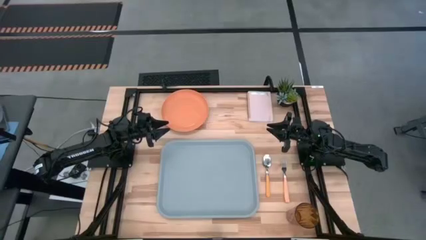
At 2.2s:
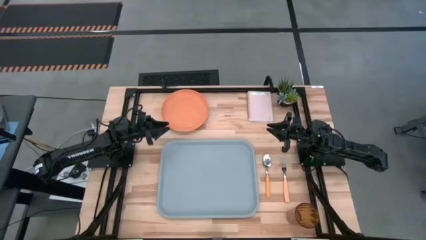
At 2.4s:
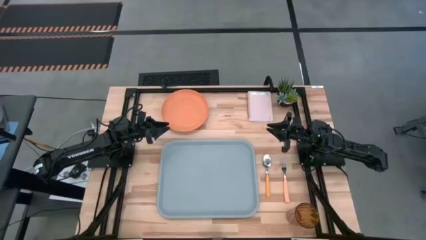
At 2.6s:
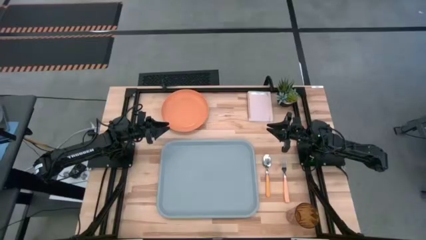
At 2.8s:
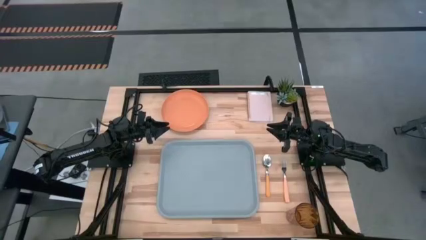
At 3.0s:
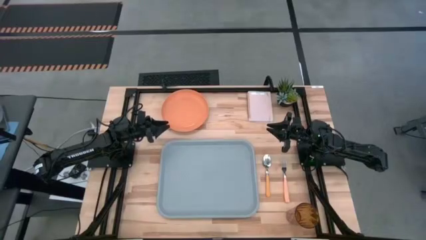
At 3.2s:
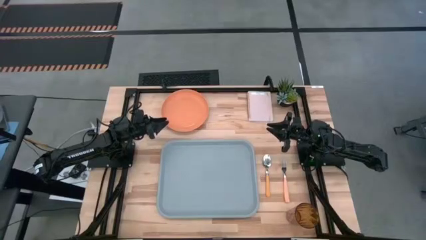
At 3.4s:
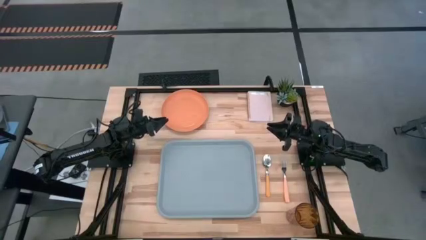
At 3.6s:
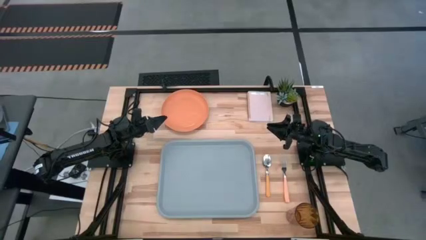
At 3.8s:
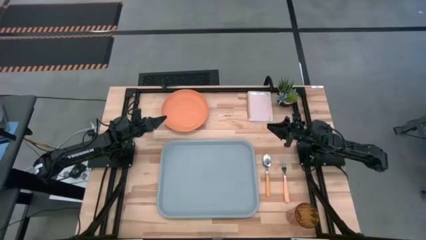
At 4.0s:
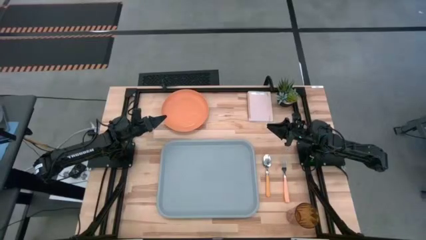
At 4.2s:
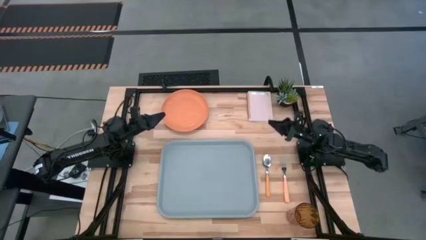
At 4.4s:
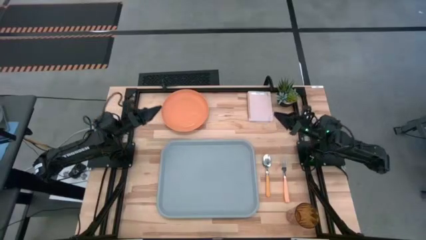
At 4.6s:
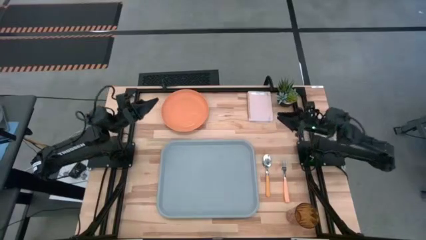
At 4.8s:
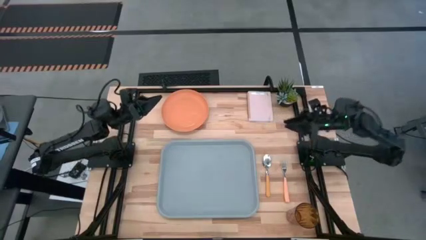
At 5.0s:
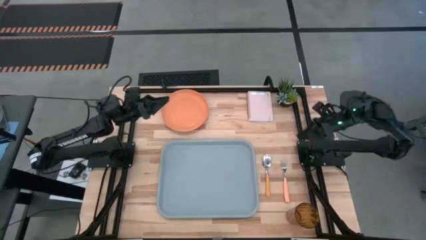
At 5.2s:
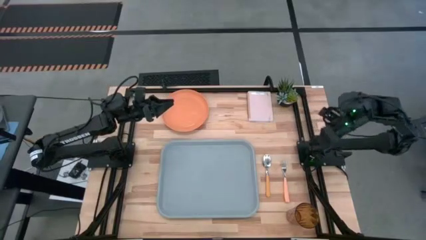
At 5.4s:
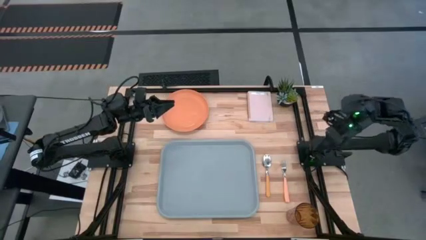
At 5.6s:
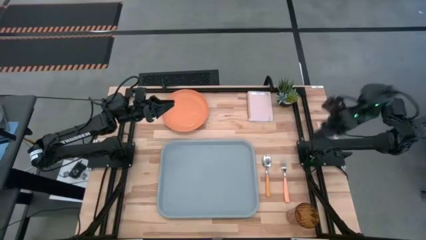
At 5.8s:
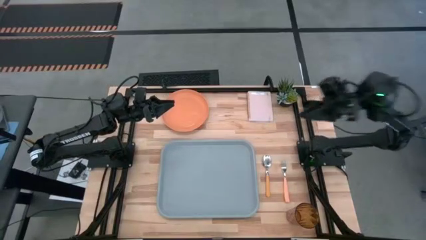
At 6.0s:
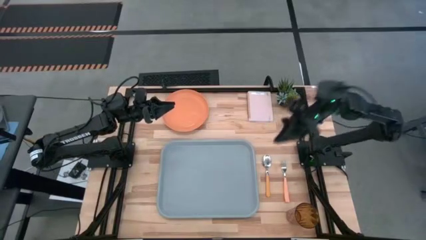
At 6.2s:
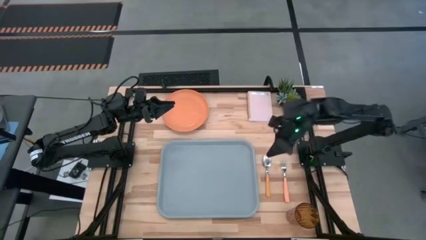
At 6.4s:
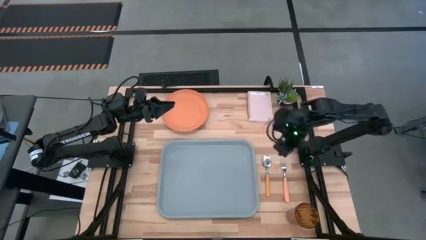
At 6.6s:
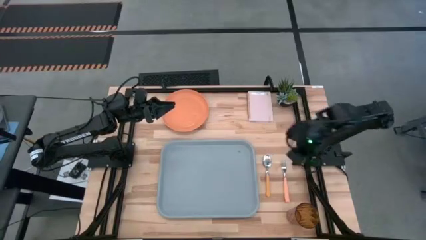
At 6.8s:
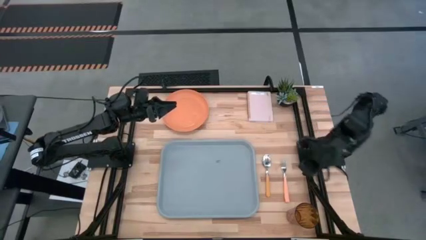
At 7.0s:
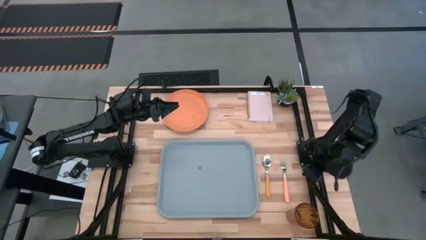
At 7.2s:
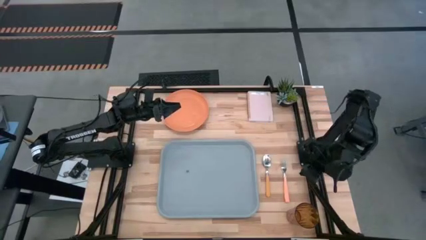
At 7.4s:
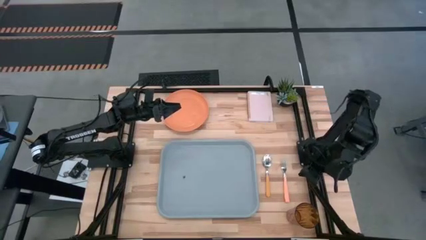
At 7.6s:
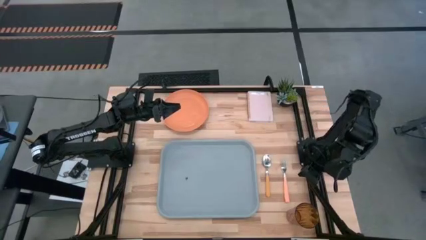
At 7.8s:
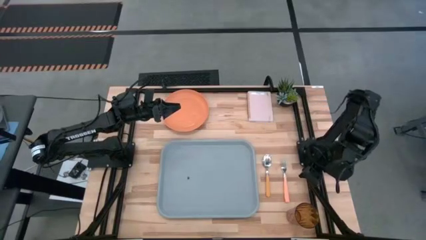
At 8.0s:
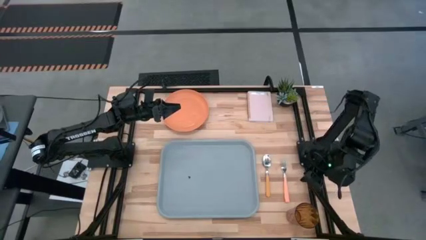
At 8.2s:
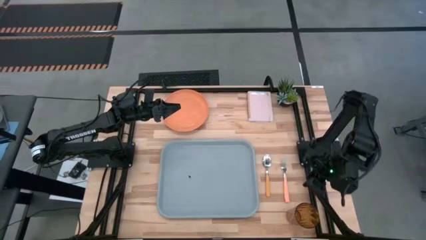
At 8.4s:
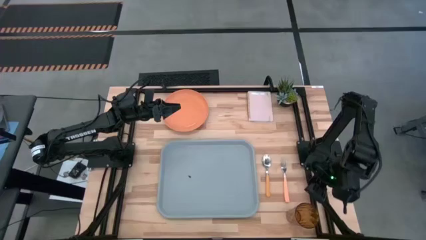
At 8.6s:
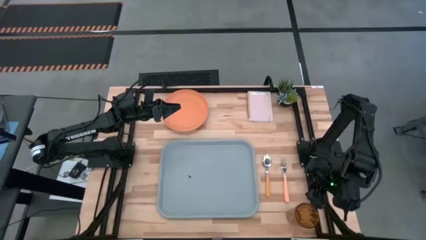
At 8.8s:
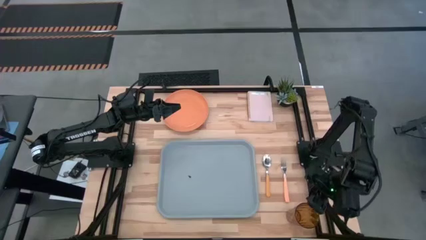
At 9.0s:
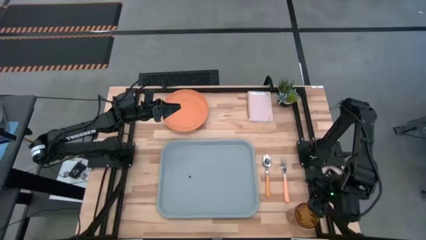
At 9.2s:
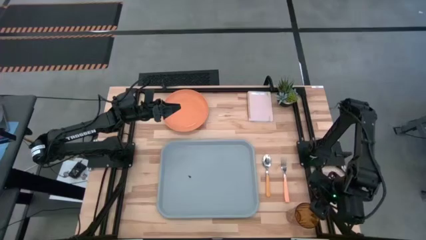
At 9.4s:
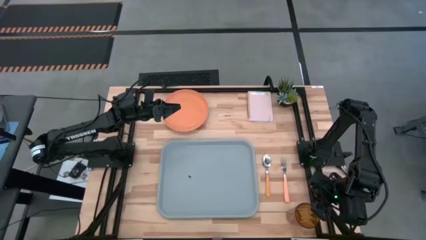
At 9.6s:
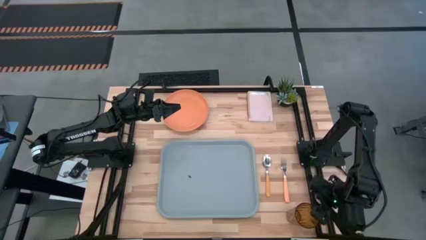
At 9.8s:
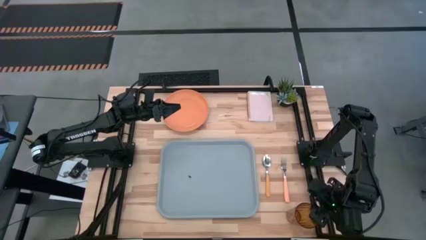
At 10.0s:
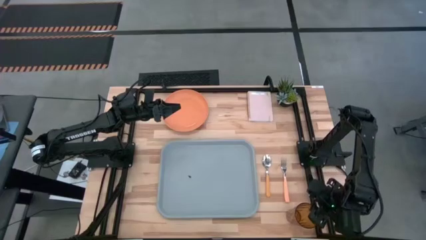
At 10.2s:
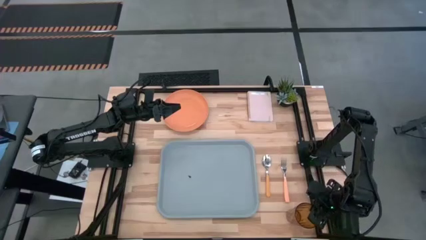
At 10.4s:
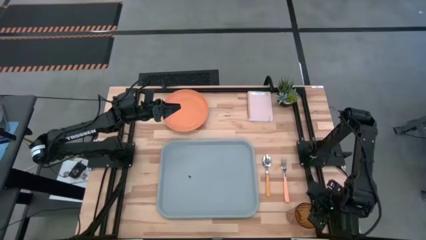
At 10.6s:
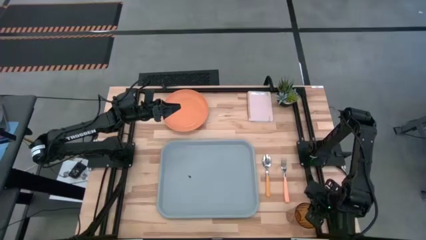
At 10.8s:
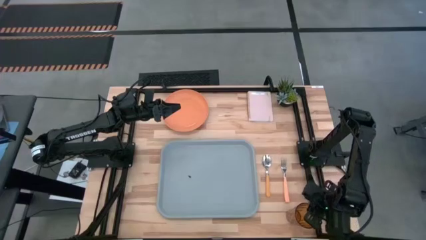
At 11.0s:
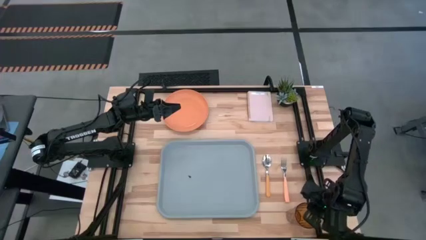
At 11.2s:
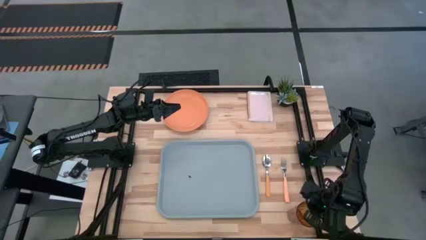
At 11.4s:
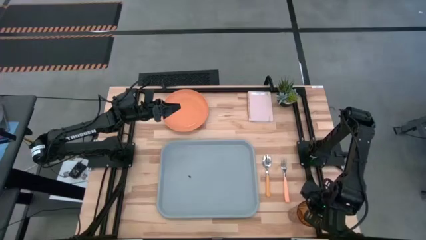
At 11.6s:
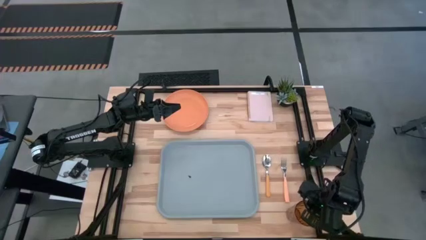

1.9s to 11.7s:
Task: Pick and place plate/cup/fork/spoon on tray
Put the yellow glass on the serving tray

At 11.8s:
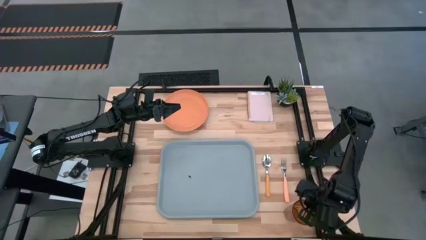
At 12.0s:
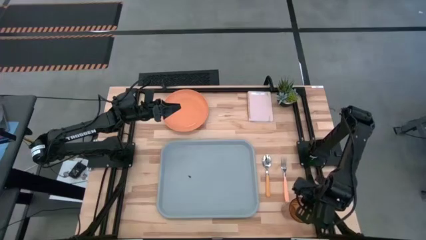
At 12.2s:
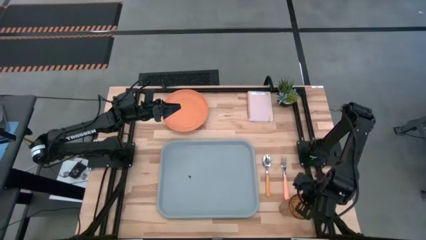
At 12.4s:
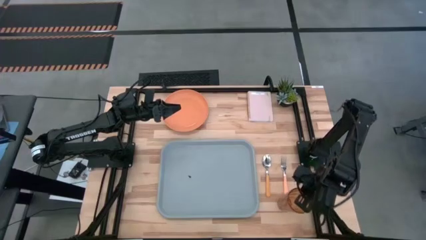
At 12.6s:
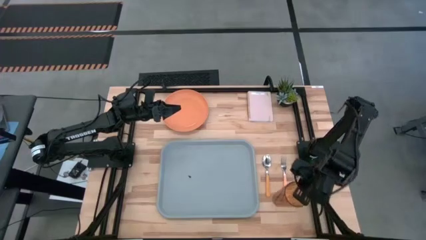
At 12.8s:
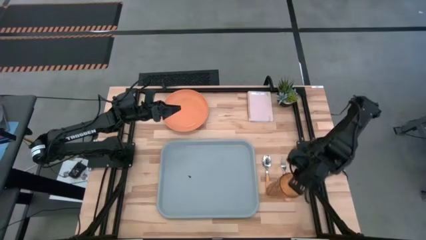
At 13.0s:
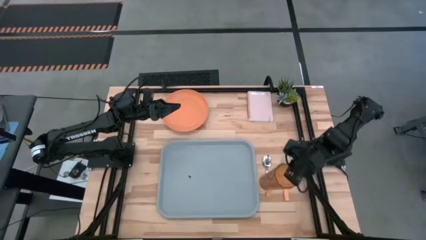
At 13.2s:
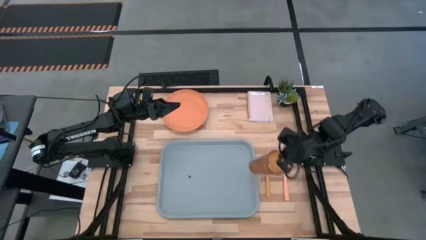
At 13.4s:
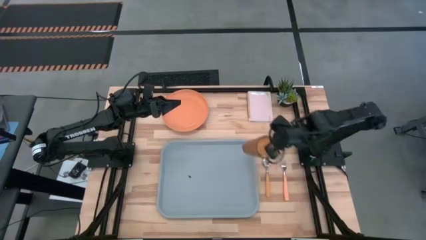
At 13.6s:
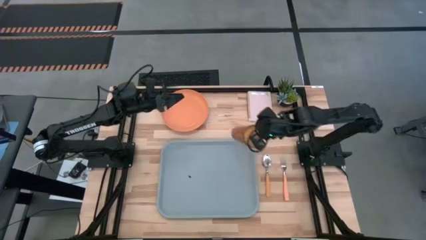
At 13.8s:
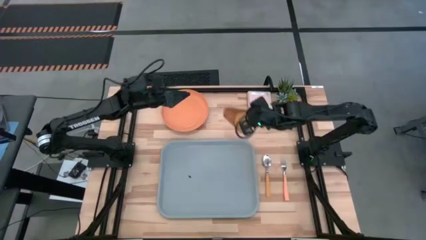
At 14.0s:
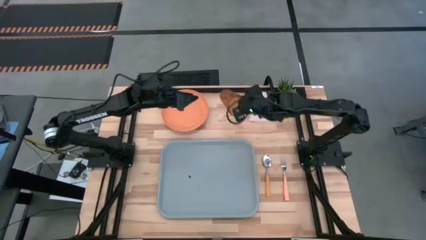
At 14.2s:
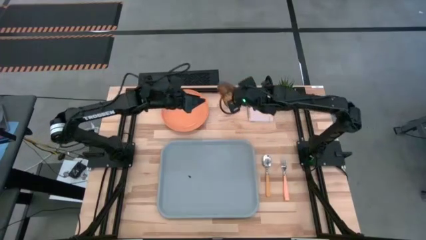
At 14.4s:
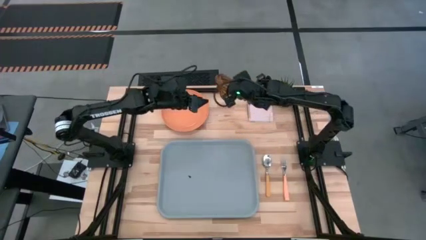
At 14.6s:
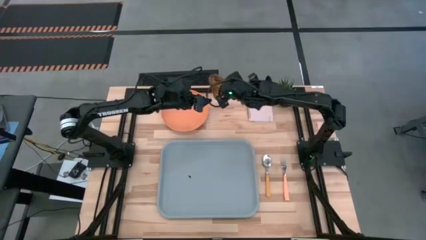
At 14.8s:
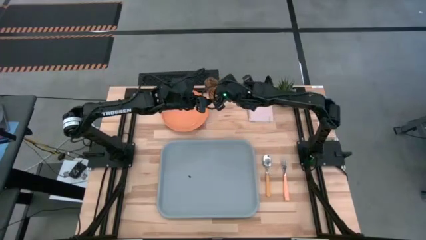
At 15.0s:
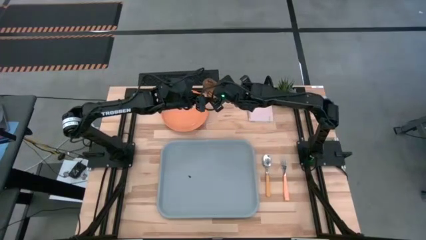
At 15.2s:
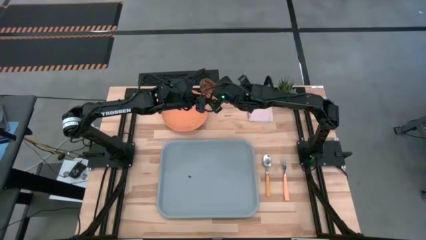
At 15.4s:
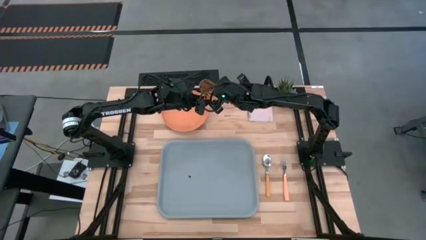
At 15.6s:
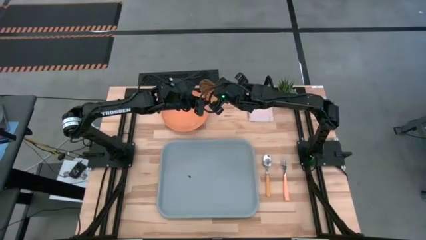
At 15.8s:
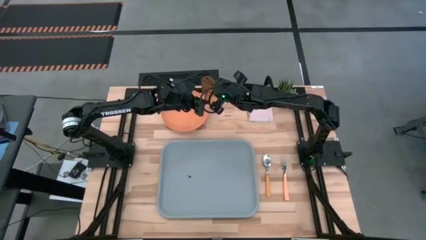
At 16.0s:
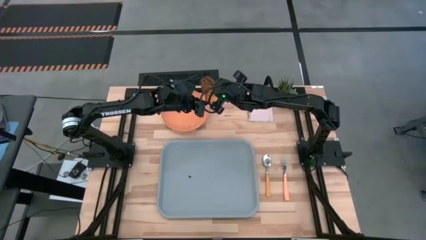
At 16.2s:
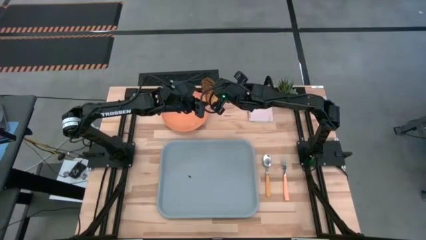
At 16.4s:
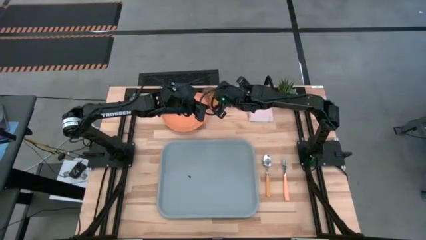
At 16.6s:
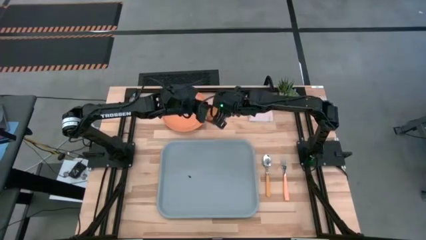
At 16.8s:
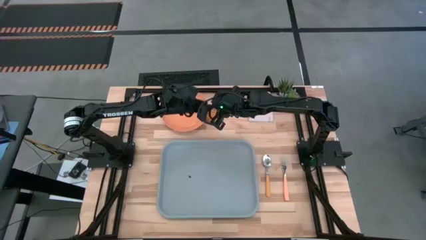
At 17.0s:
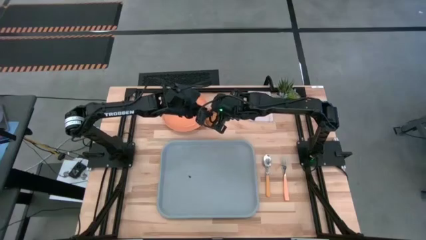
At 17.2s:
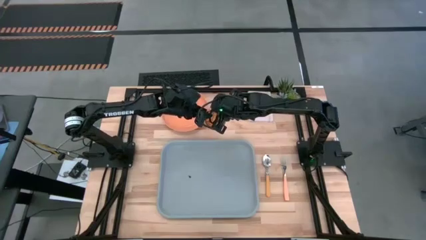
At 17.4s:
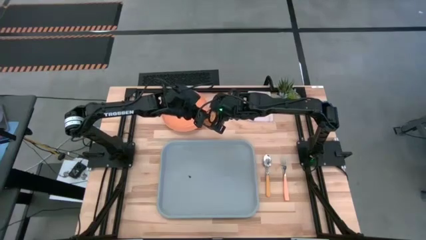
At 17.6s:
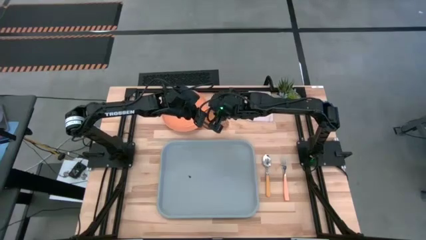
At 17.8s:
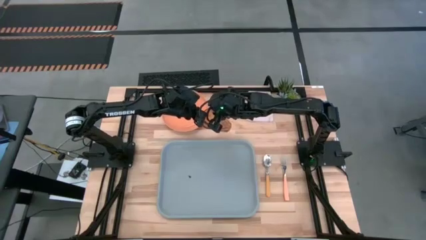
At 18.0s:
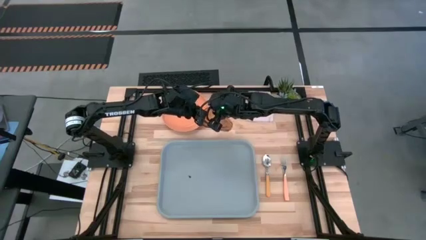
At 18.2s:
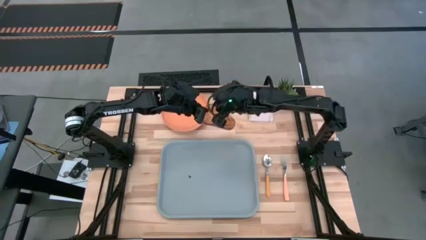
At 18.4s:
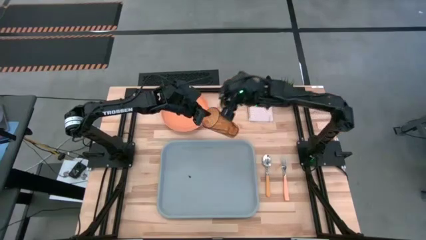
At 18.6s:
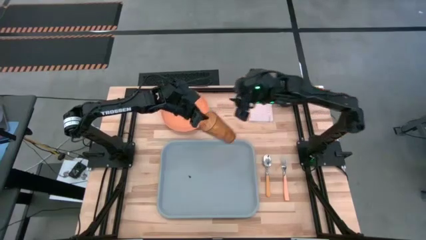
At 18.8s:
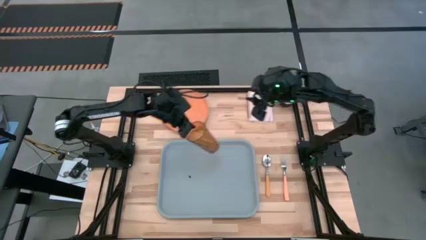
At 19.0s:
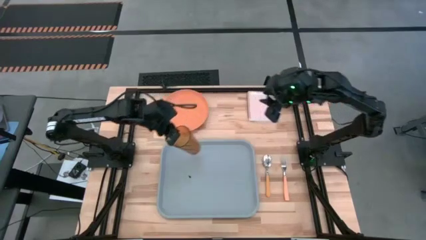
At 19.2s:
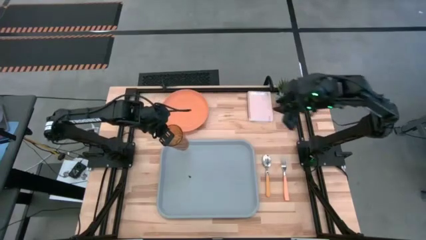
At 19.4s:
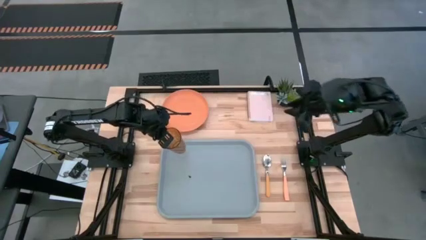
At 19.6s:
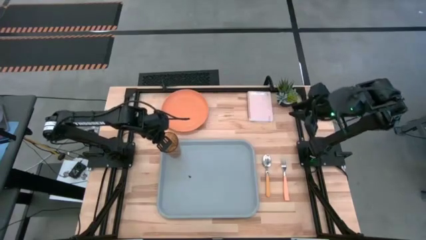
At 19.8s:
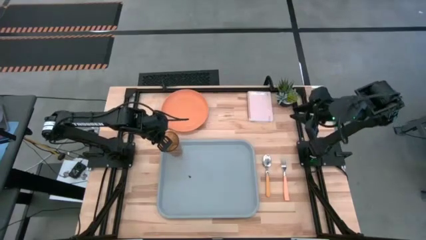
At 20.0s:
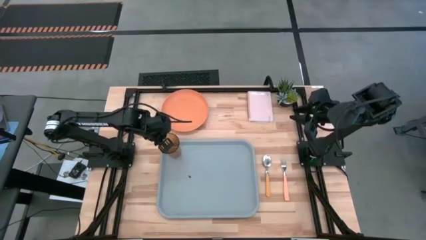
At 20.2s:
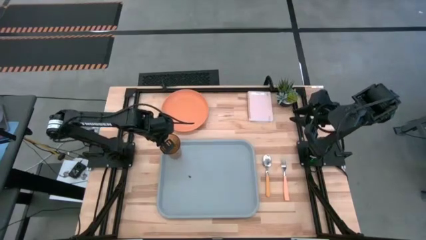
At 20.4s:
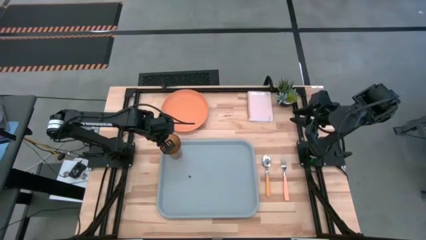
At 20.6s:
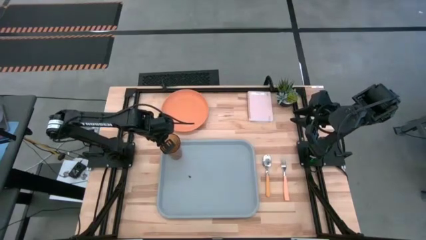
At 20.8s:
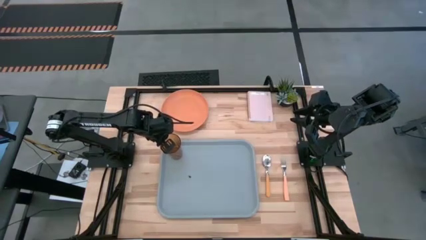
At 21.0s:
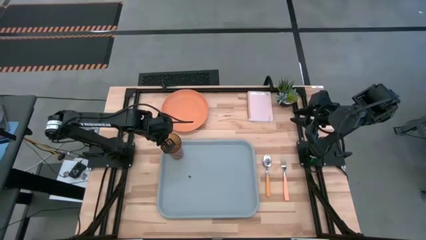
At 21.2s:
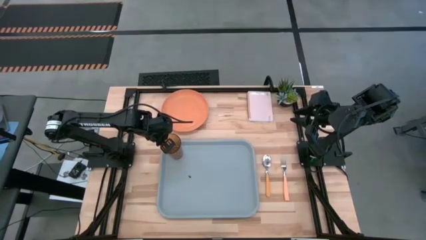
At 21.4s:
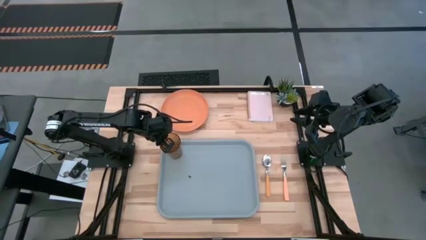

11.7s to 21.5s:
Put the yellow glass on the serving tray
